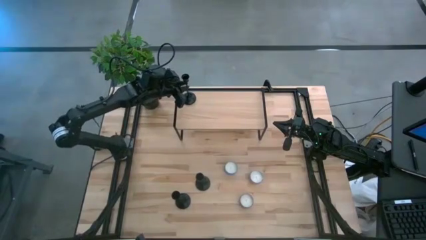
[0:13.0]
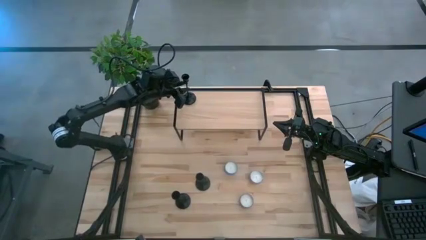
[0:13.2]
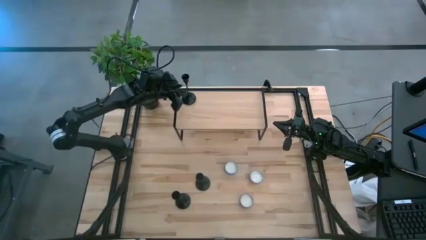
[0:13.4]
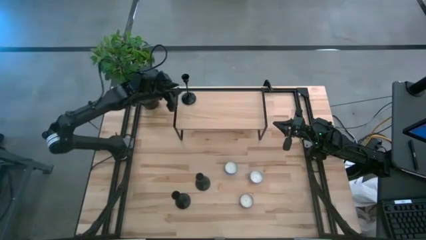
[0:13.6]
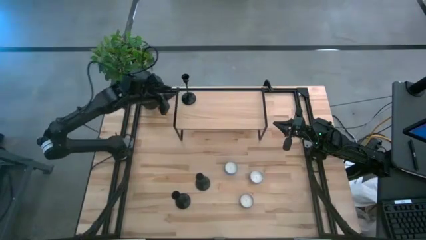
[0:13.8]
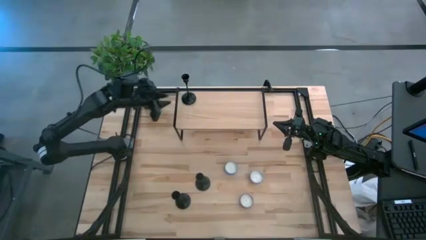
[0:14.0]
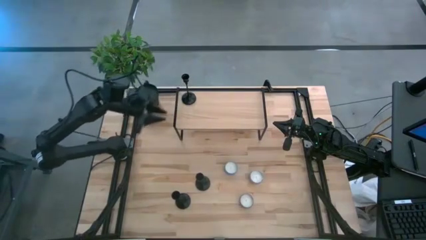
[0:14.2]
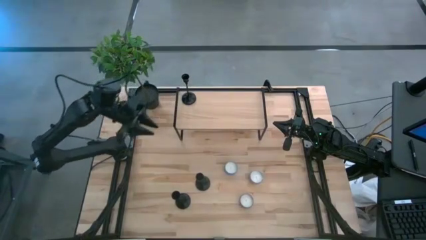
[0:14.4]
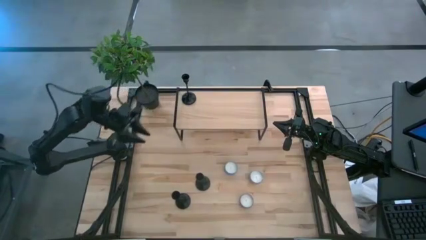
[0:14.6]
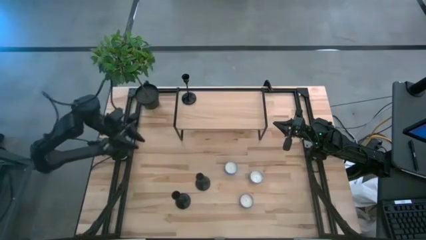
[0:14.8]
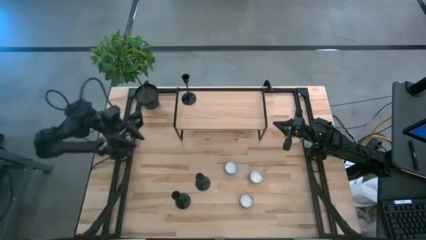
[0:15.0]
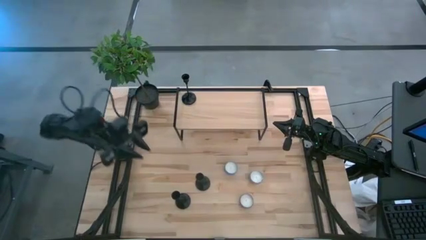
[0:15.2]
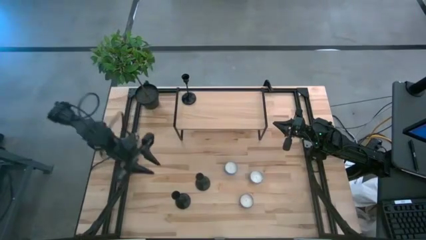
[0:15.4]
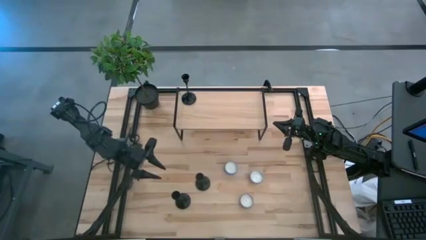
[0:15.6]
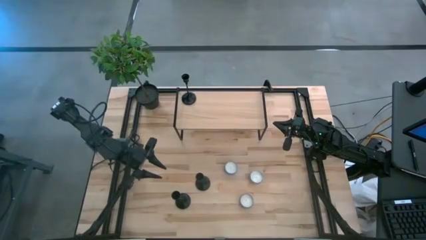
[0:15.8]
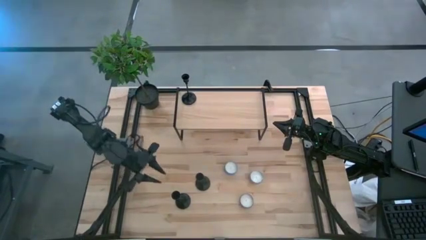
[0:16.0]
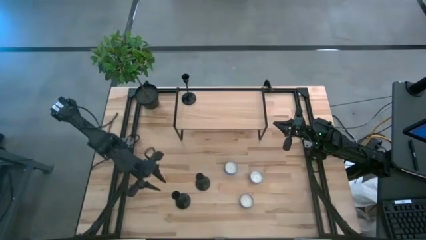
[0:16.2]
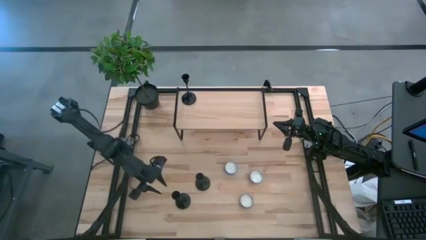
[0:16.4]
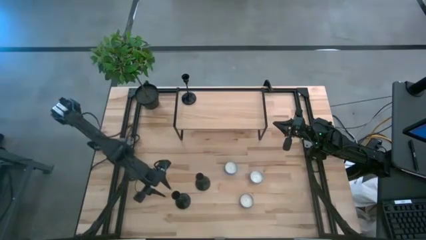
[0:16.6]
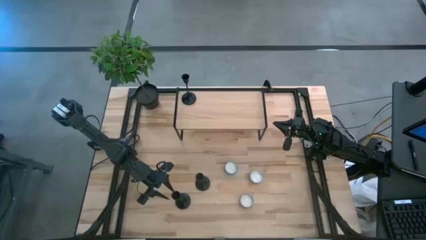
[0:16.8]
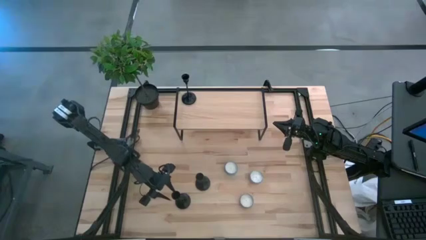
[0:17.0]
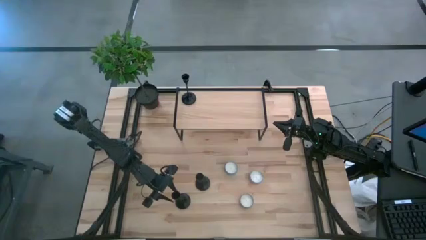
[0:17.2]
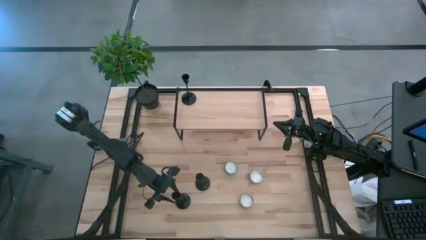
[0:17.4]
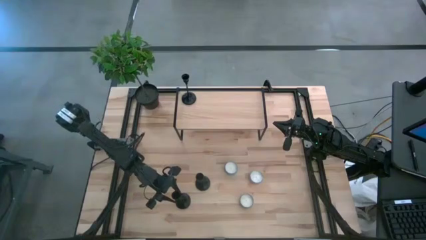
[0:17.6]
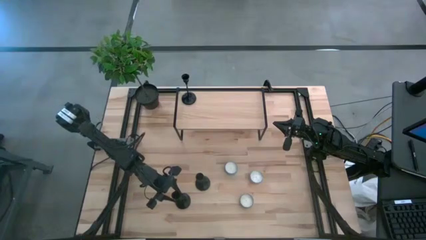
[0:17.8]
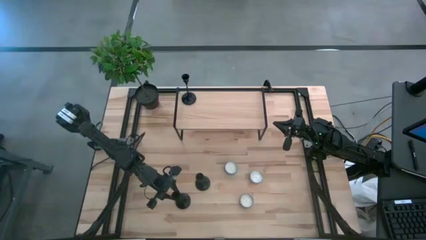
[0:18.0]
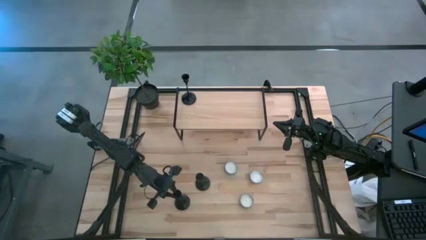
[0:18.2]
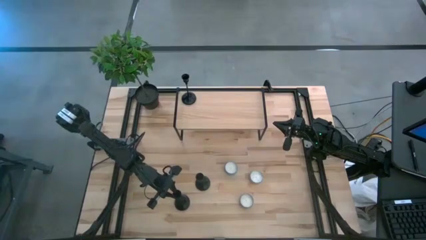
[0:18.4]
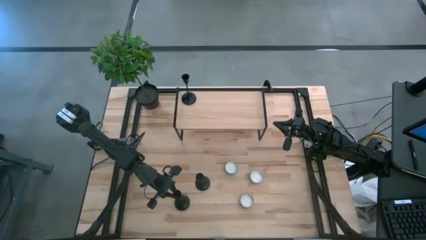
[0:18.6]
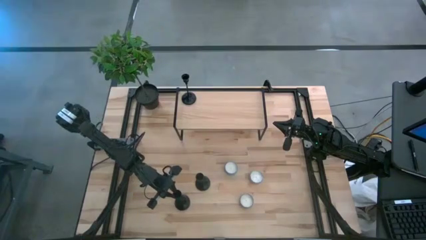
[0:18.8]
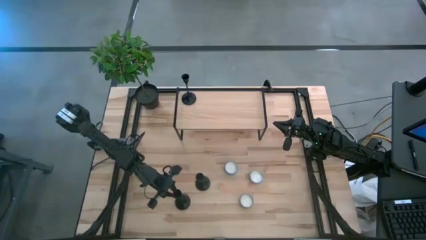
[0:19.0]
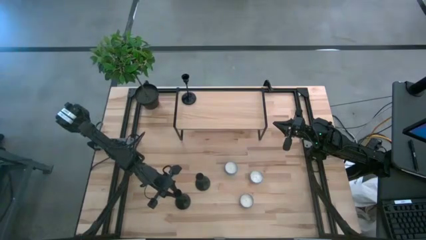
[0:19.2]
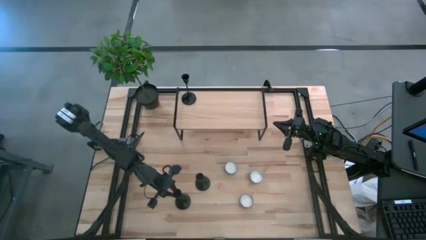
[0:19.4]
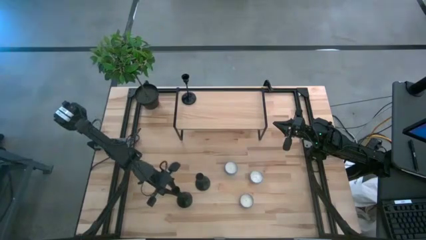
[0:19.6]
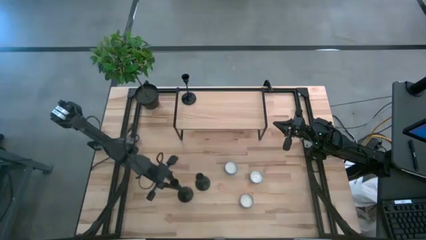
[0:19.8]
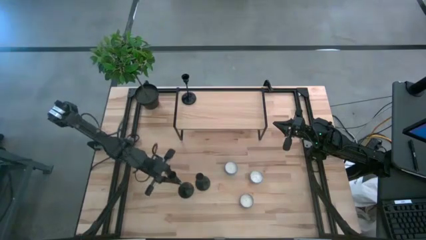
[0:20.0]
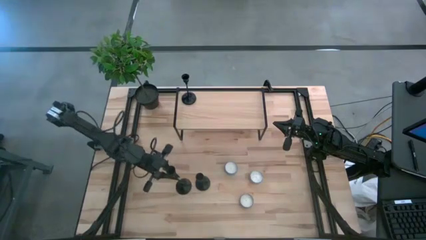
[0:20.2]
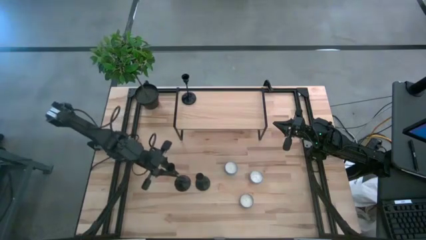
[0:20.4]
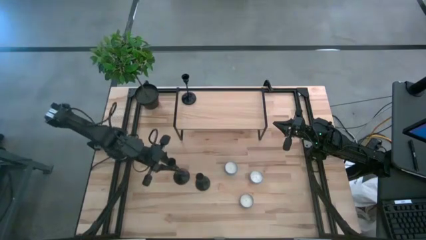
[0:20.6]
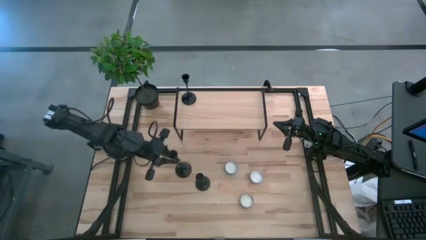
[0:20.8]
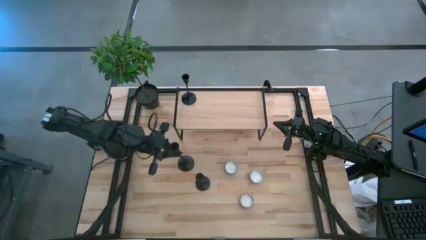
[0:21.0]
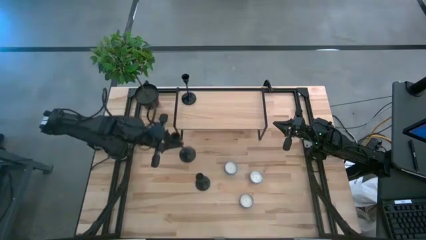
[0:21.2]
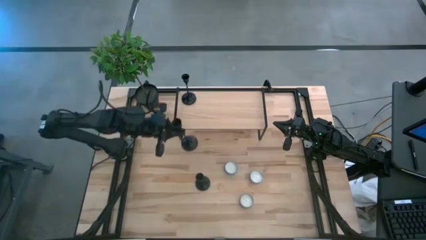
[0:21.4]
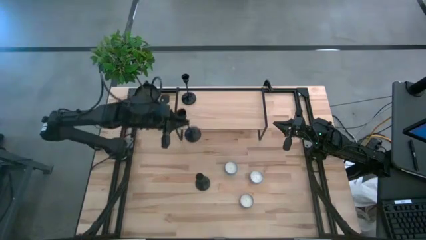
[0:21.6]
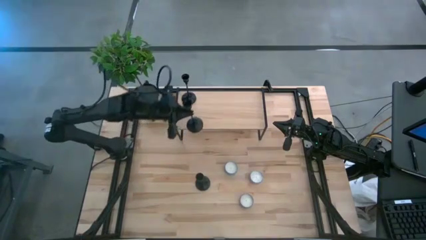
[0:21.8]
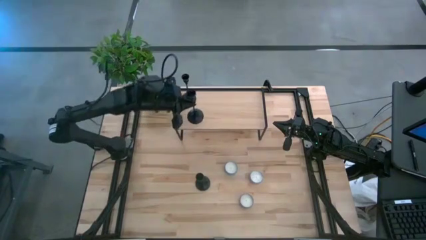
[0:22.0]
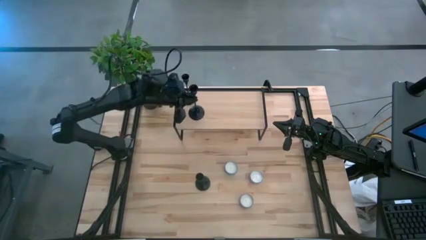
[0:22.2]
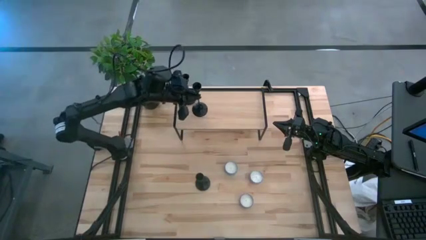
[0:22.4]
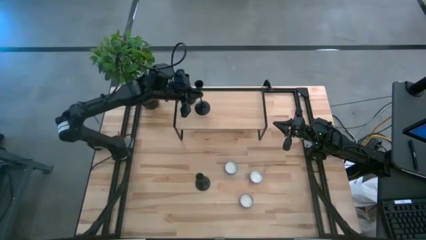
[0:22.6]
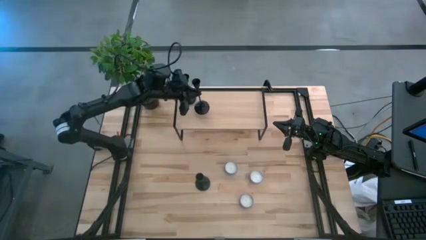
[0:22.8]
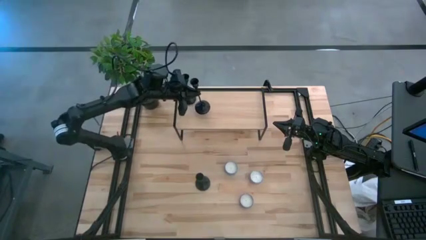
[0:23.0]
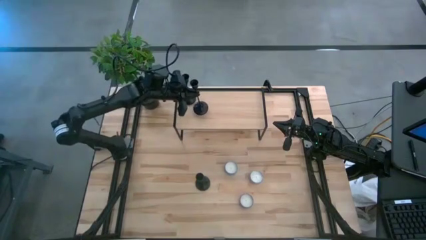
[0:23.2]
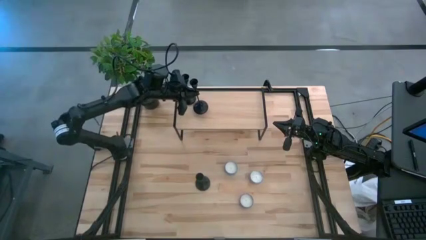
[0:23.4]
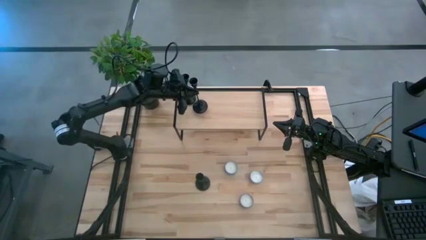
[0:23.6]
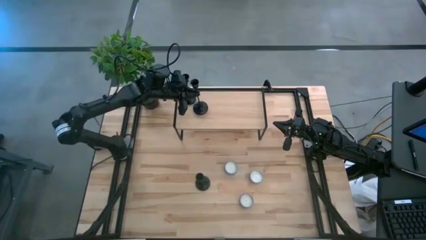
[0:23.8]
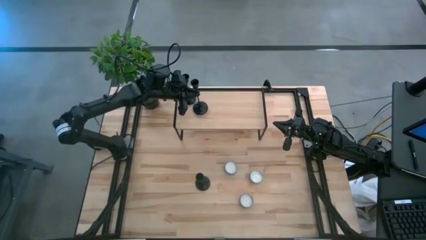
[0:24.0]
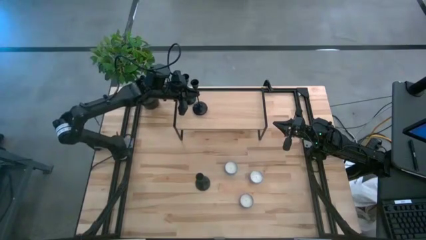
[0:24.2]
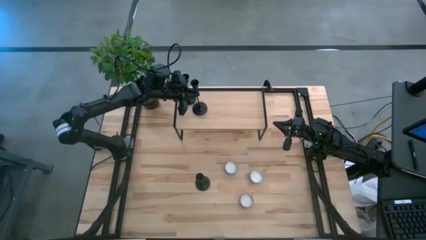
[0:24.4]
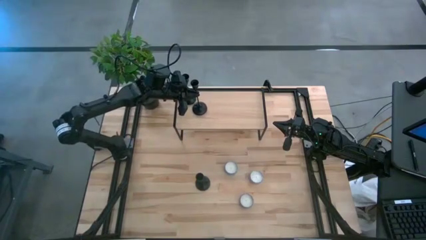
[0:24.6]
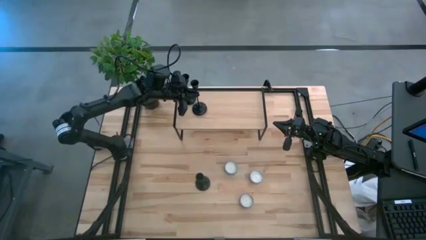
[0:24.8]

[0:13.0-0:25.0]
Task: Pick & Place candle stick holders
Put the left black candle holder on the shelf

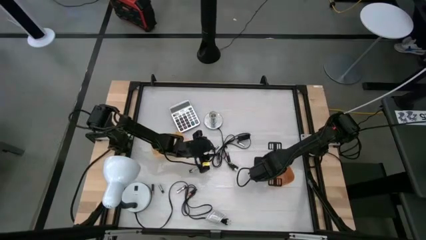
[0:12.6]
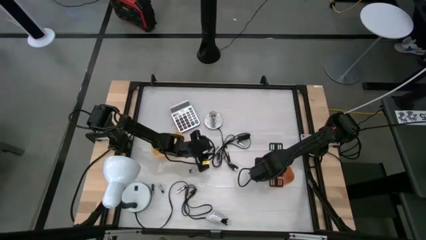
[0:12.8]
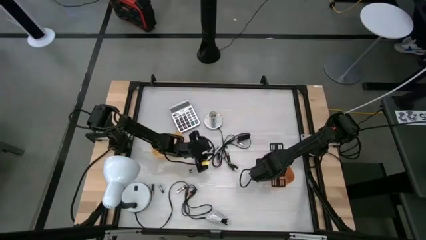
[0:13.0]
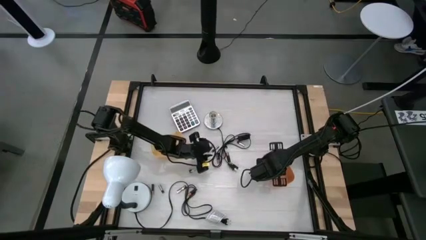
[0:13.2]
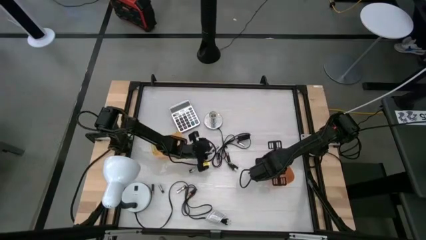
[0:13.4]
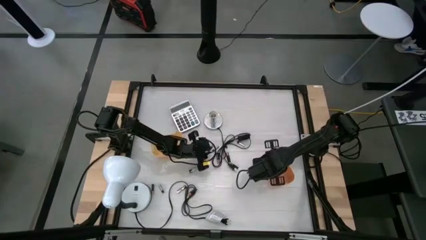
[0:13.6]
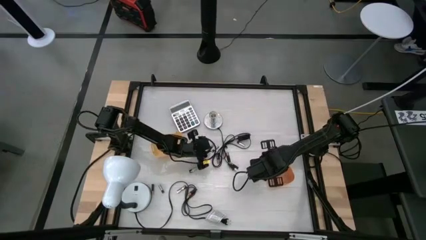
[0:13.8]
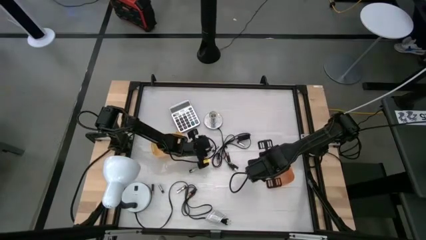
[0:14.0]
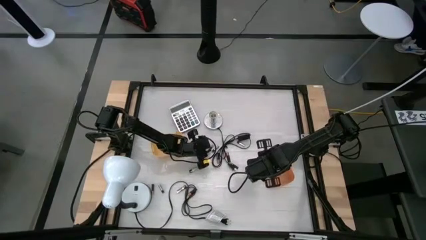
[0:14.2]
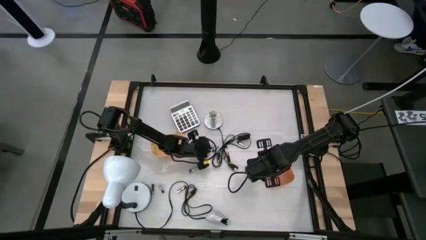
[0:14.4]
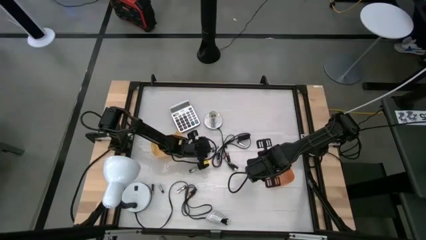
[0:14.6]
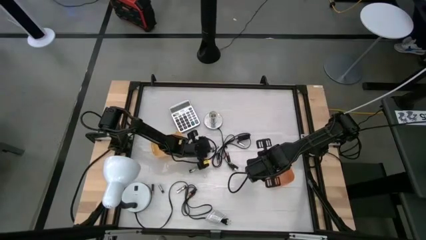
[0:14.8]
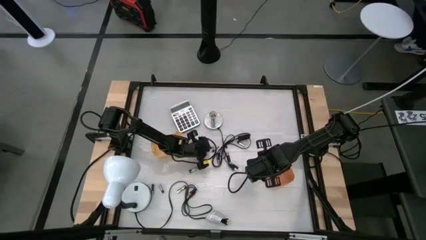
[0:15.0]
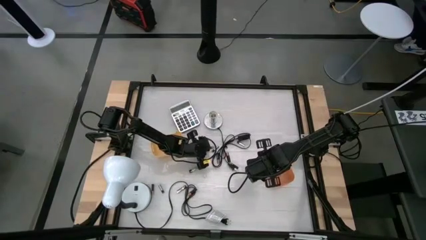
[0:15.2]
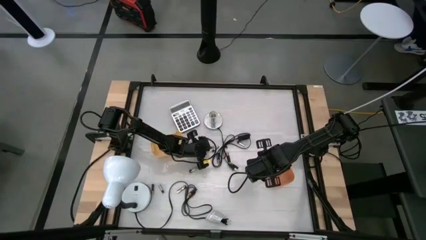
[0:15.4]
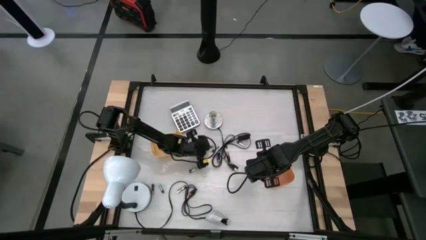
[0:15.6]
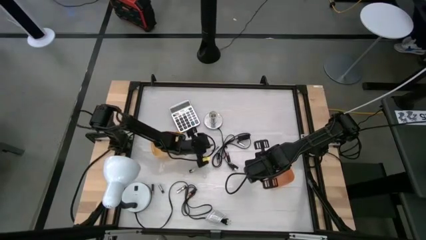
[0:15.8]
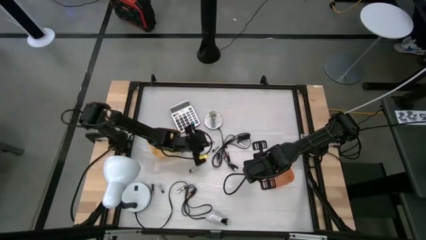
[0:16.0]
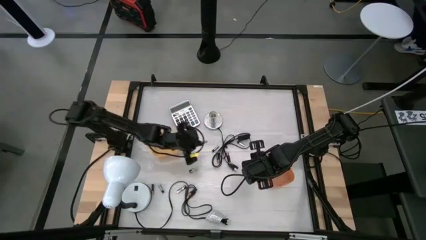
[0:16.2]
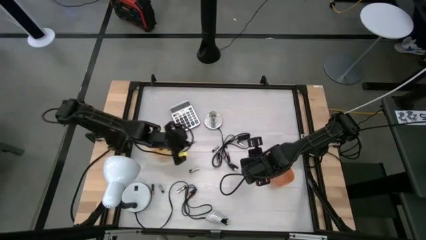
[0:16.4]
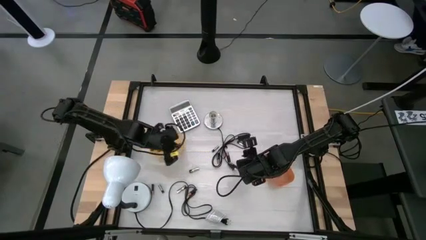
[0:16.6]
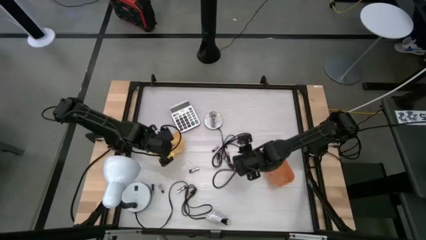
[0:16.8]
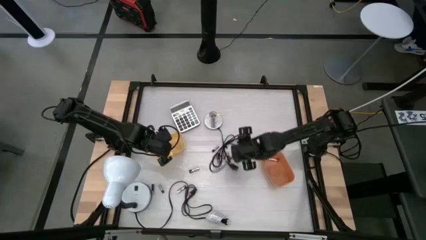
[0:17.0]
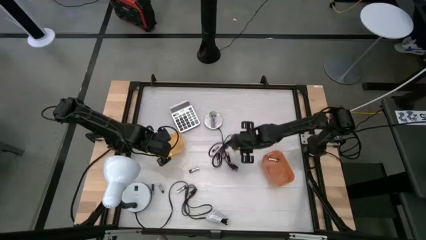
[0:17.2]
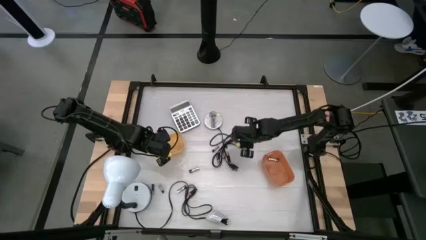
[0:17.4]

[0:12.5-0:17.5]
Task: Sort batteries
Put the black battery into the yellow bin
